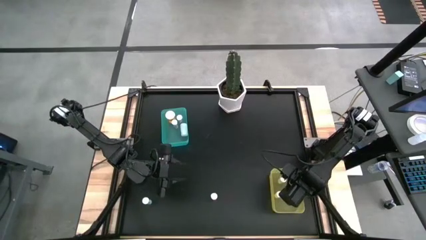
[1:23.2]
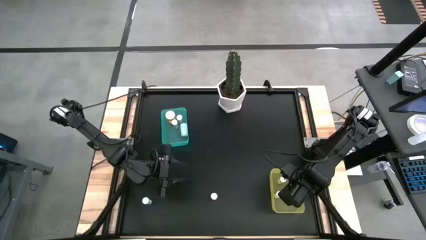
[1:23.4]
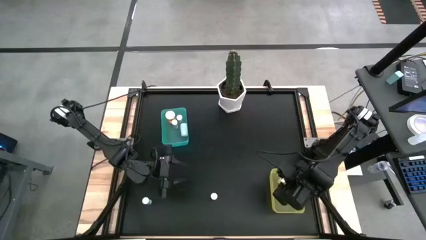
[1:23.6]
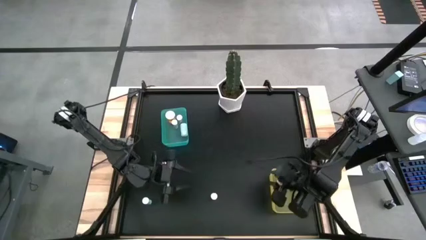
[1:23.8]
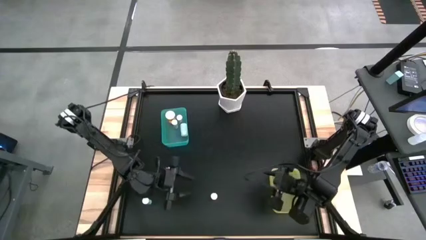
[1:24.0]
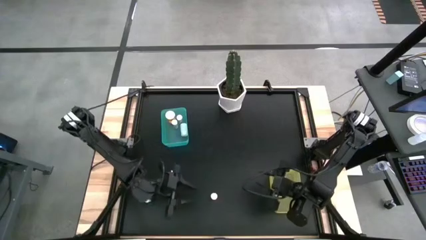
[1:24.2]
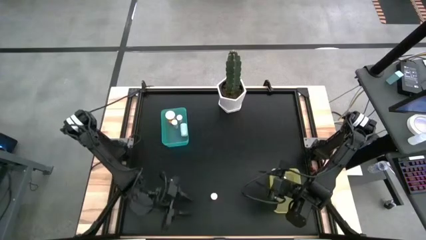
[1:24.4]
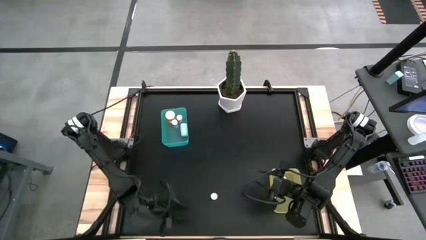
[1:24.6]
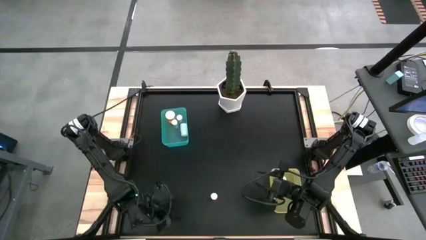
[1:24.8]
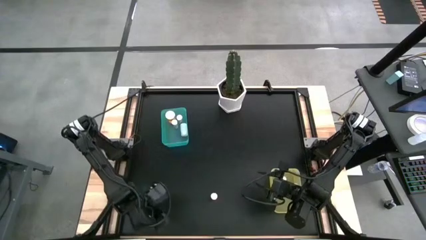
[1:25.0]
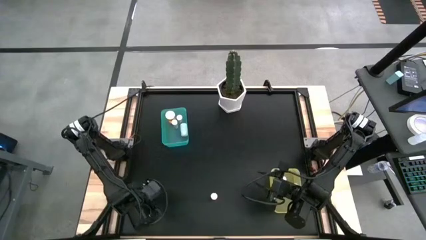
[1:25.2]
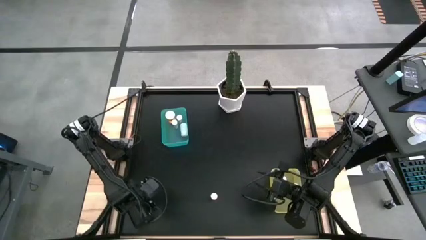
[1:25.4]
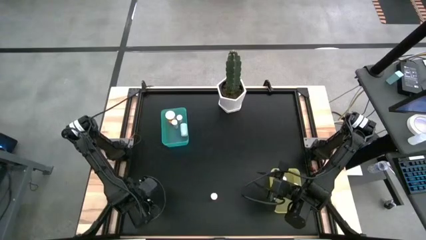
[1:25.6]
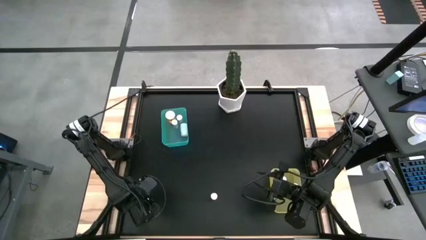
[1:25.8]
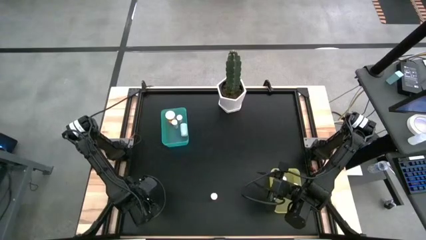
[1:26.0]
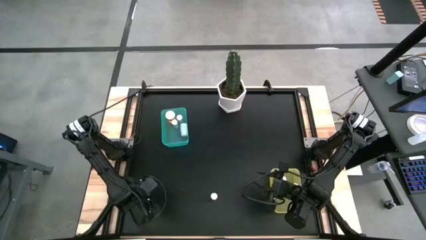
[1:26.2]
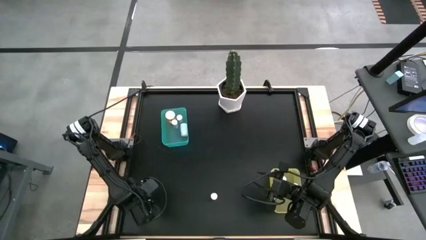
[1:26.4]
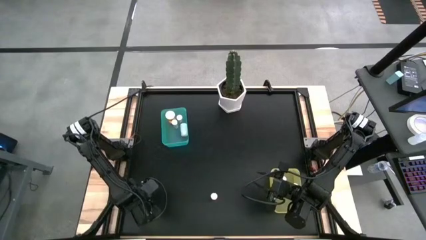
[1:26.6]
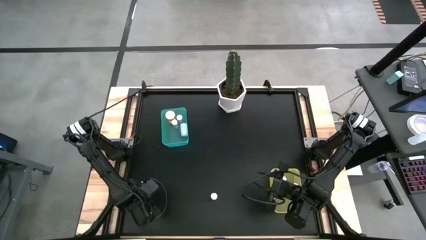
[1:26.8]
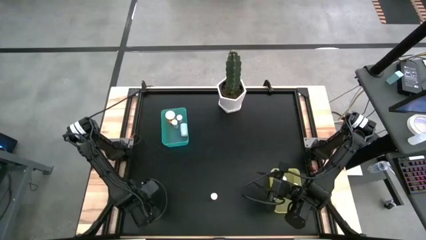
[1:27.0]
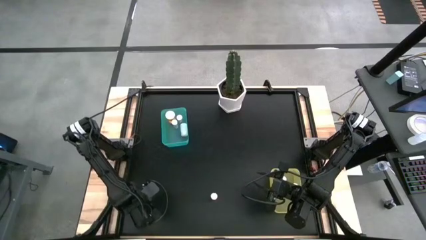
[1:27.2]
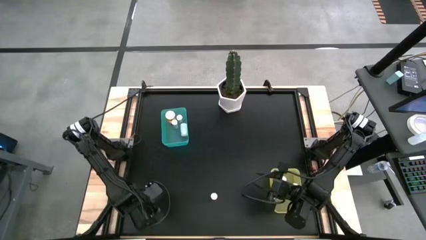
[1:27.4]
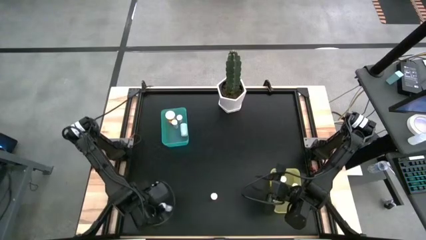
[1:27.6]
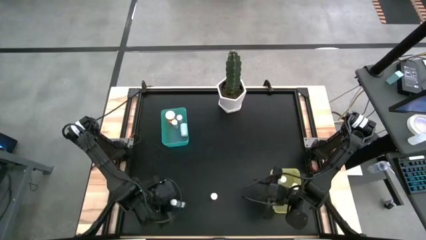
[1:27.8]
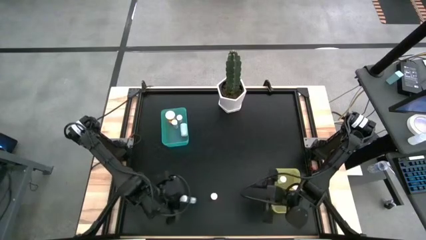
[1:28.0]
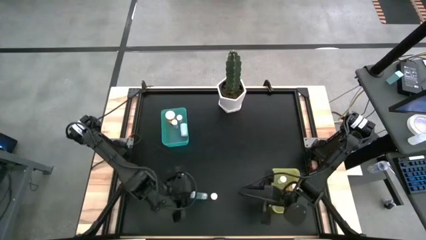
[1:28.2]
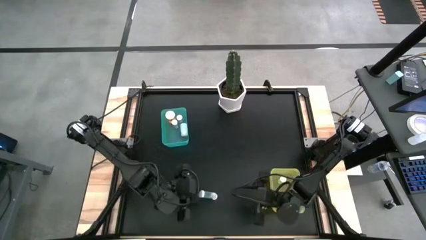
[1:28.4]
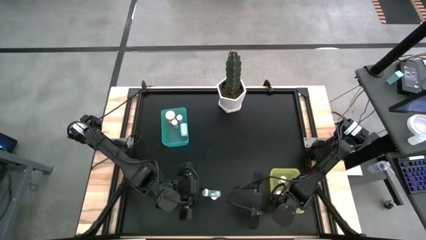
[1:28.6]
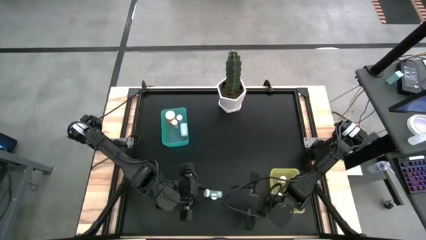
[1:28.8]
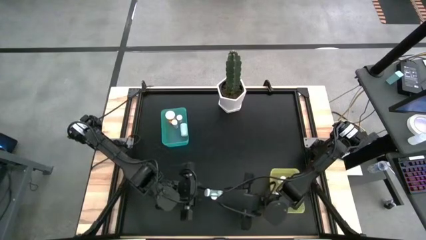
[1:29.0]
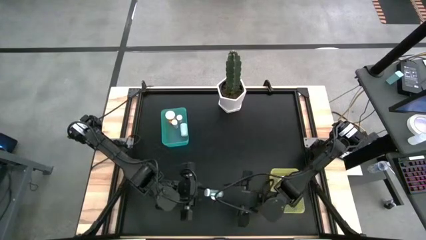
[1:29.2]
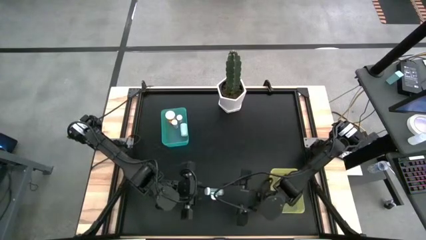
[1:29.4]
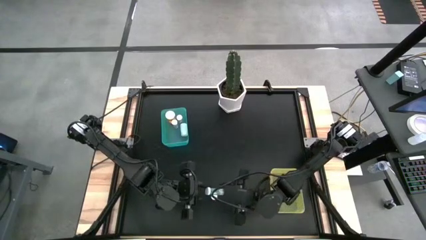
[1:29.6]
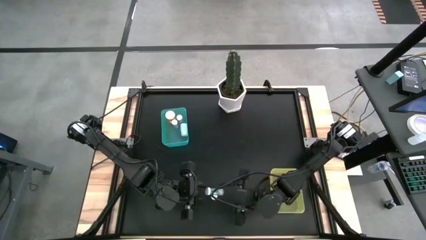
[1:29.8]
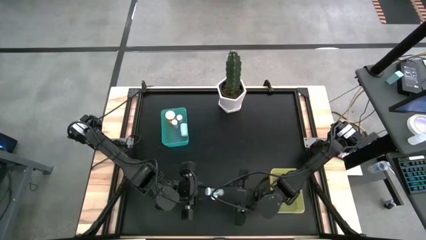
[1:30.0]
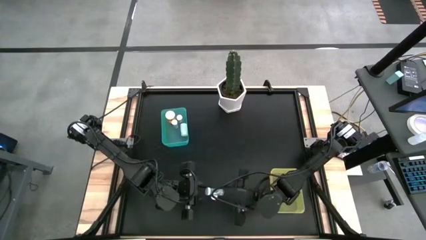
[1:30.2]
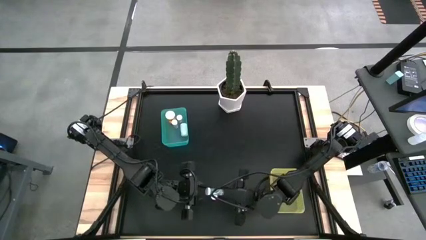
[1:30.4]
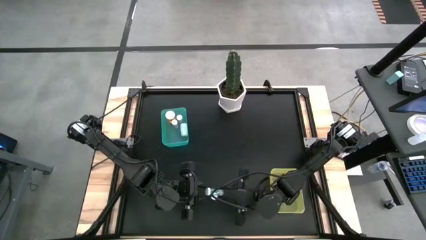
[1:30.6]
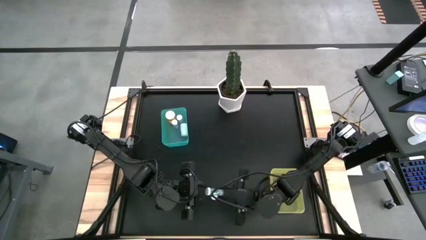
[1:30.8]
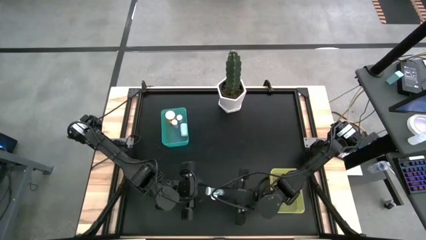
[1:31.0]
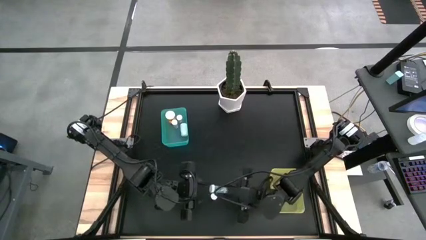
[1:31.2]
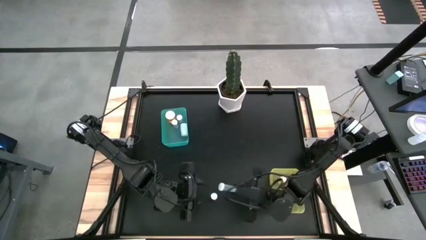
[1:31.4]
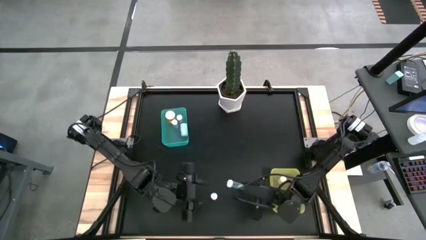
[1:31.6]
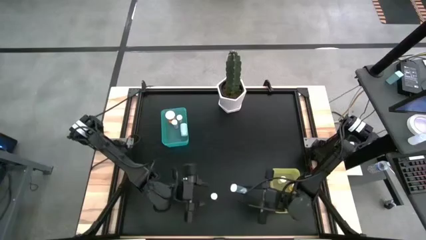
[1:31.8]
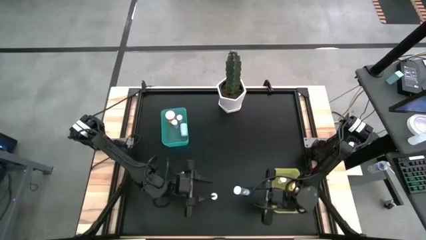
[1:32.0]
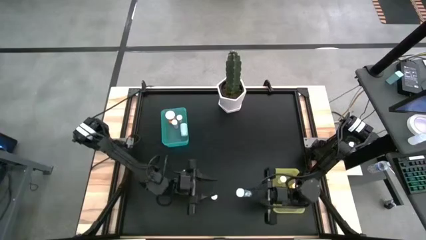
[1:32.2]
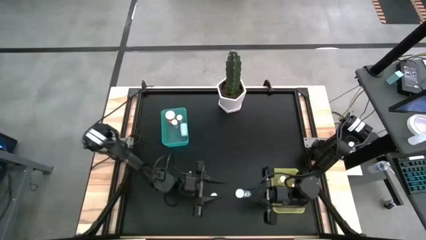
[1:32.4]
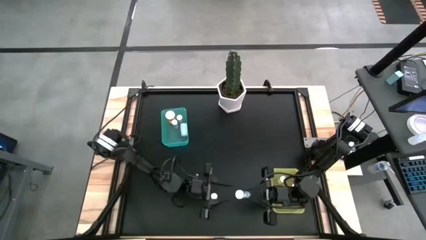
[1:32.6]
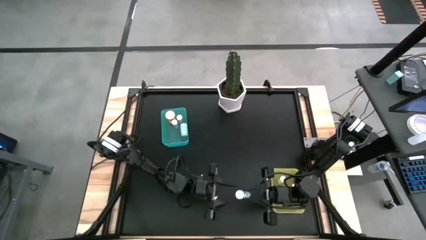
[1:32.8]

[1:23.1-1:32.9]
Task: Pick and place medicine bottles into bin by pill shape (circle, oval)
Put the blue tablet bottle into the yellow bin

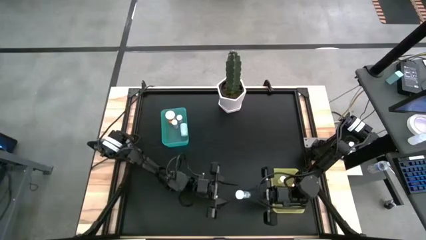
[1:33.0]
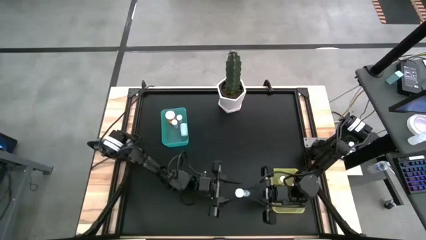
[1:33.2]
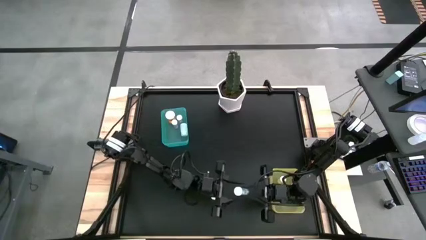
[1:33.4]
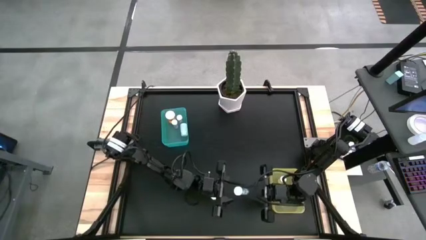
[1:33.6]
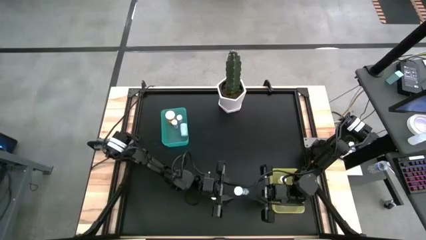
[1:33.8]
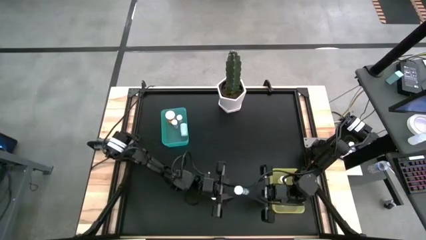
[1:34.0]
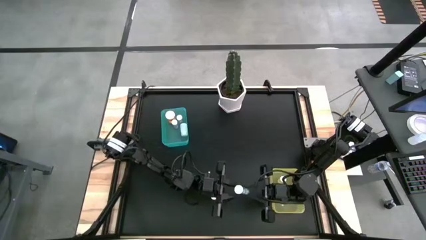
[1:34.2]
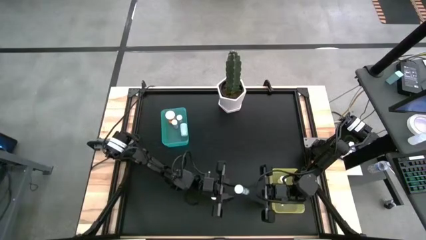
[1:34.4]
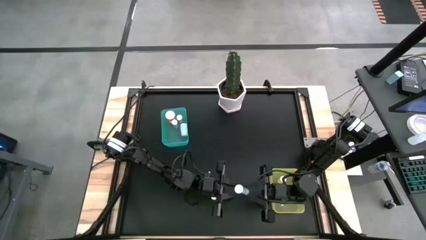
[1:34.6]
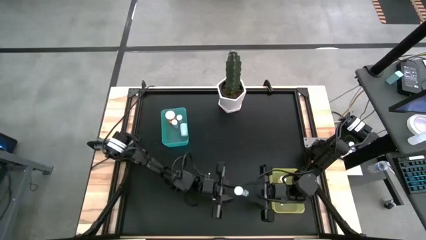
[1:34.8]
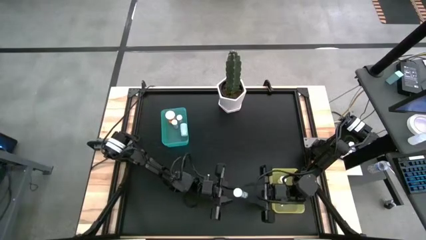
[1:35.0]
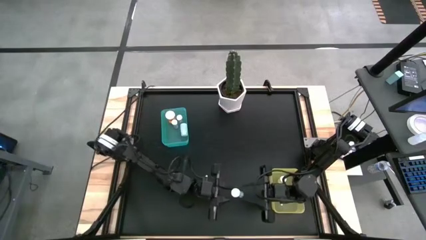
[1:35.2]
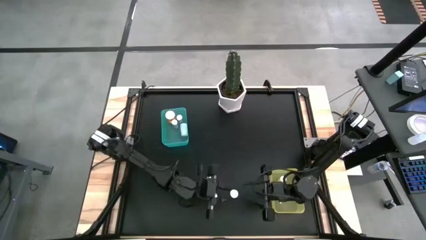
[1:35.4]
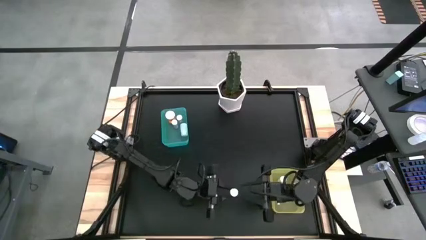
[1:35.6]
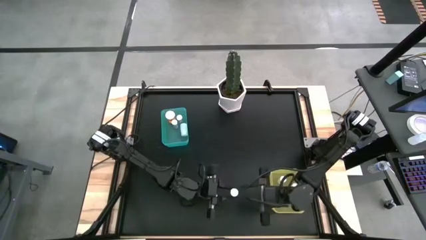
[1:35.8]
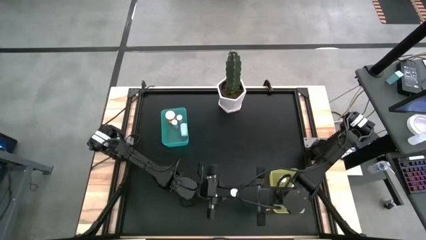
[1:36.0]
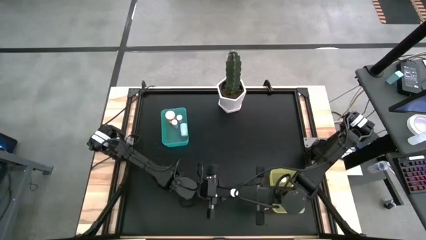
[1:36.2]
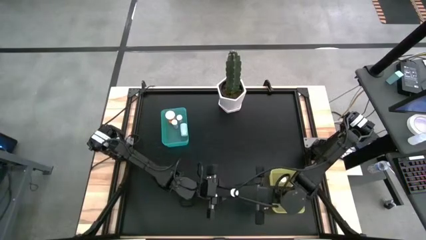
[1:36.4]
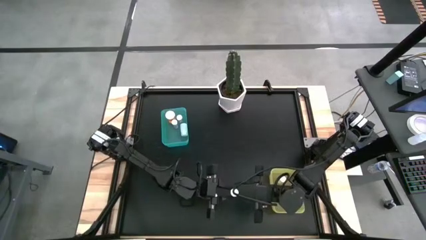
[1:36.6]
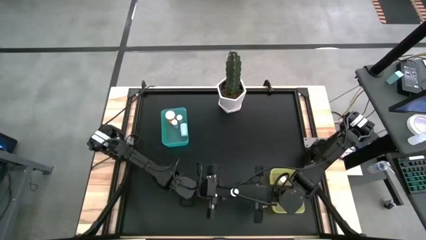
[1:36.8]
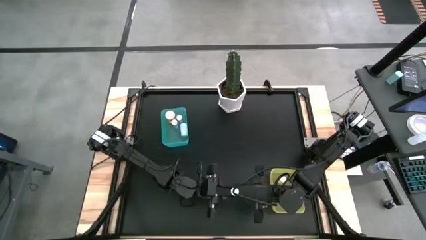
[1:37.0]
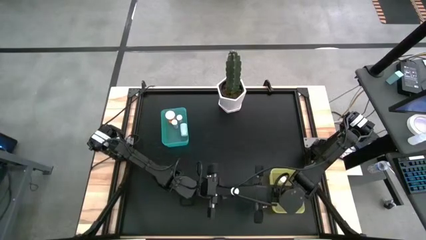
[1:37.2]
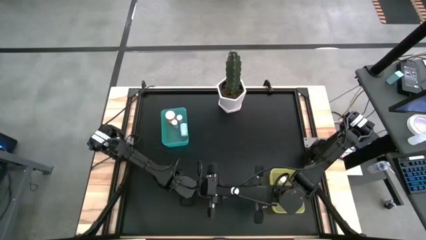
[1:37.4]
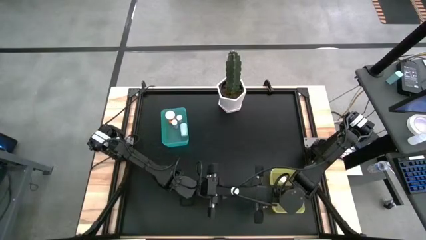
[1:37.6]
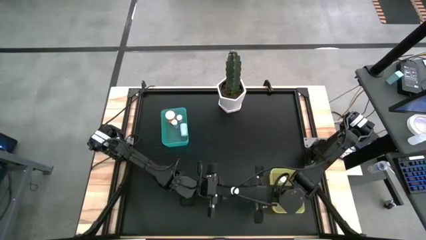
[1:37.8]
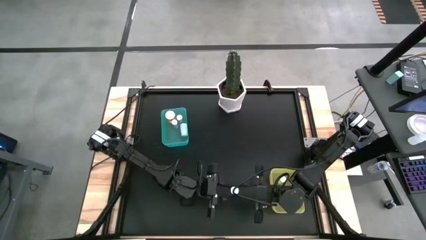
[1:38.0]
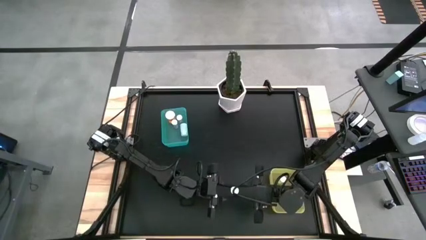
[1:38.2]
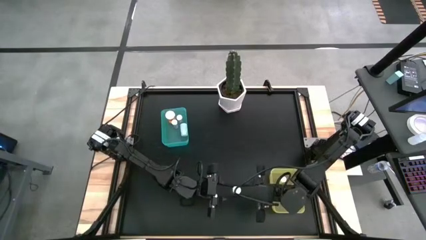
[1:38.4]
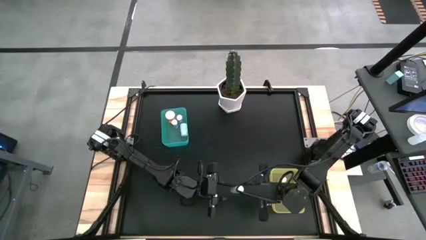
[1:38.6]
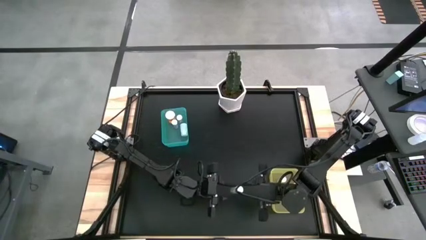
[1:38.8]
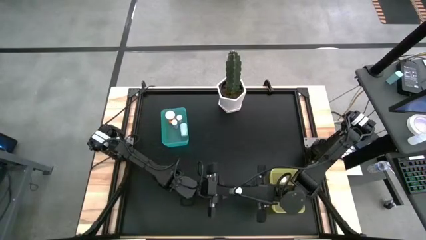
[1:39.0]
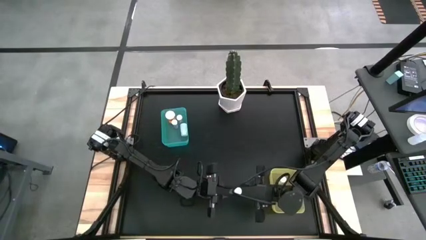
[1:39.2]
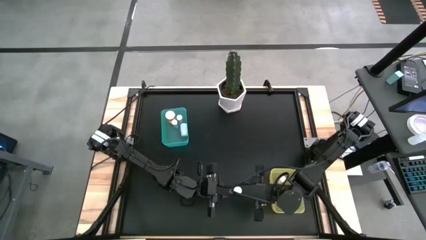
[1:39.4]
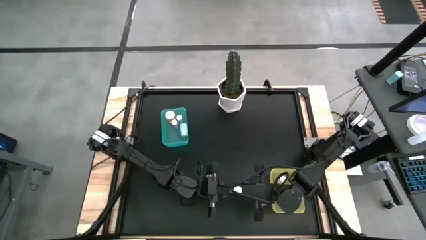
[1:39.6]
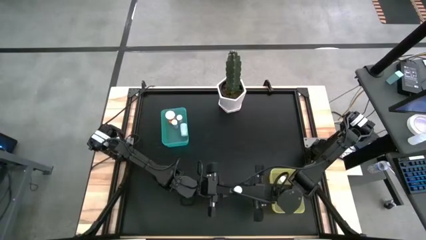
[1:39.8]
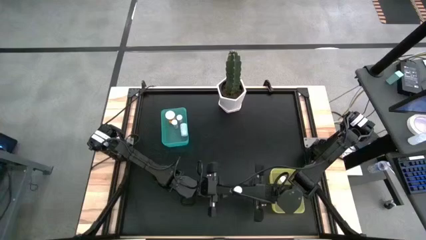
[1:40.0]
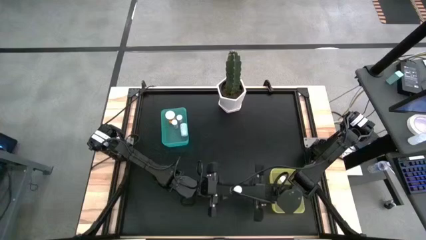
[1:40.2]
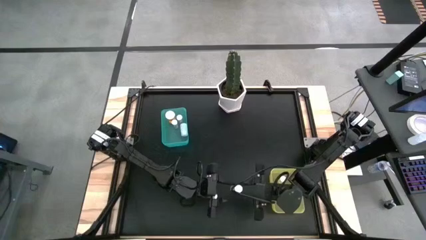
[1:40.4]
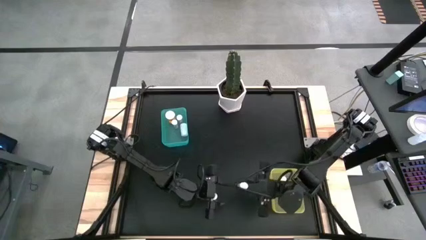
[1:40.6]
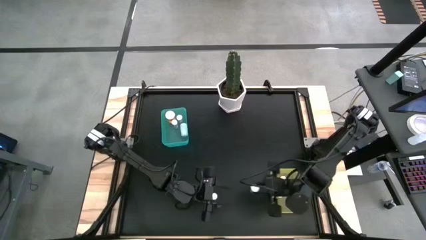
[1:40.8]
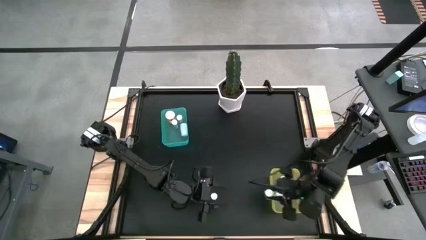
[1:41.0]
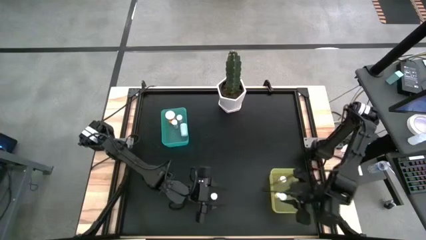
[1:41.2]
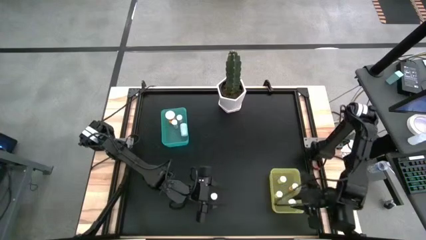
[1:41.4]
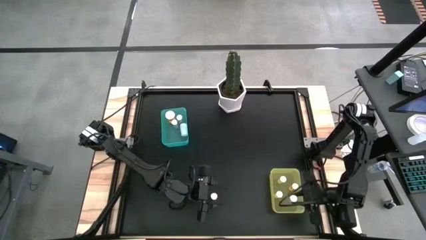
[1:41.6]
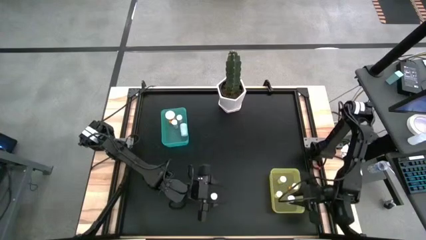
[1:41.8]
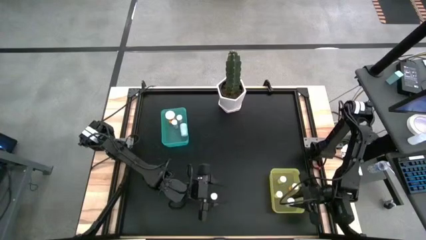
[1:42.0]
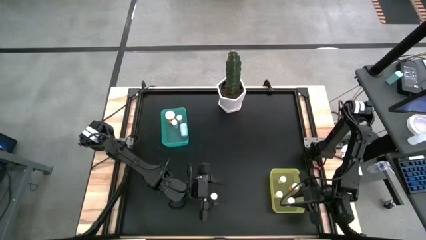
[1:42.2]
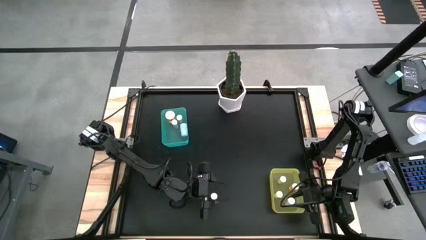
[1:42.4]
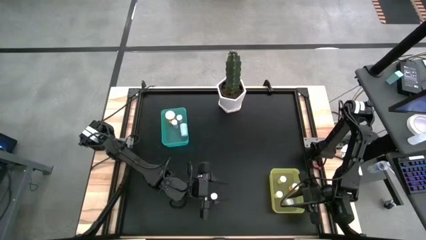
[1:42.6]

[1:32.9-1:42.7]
Put the blue tablet bottle into the yellow bin
